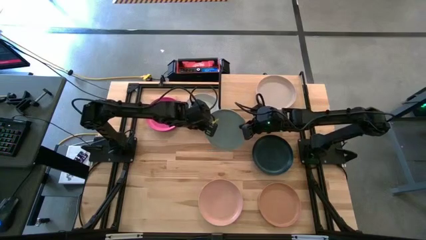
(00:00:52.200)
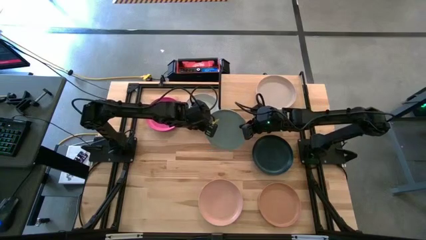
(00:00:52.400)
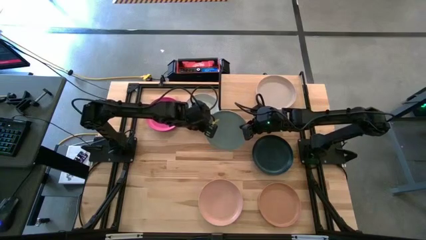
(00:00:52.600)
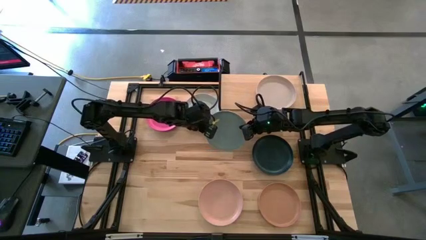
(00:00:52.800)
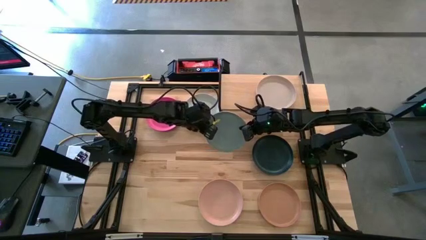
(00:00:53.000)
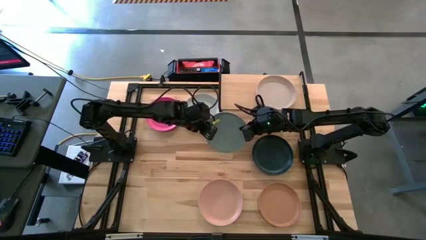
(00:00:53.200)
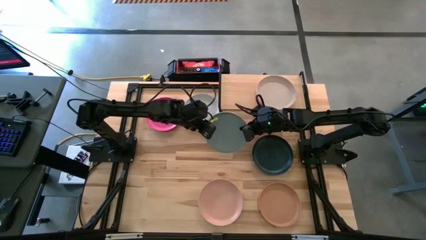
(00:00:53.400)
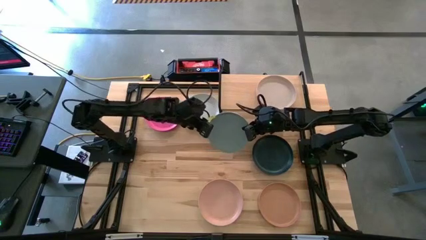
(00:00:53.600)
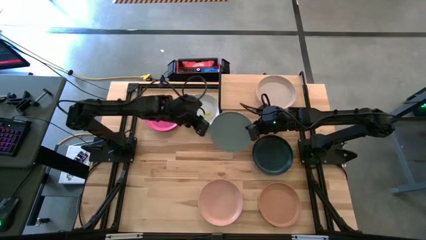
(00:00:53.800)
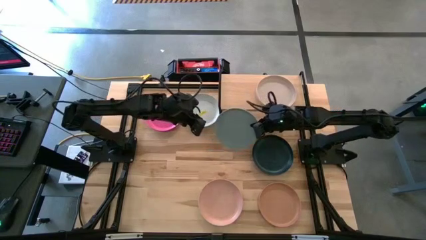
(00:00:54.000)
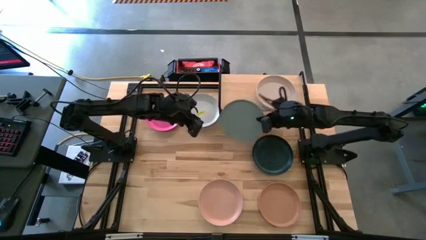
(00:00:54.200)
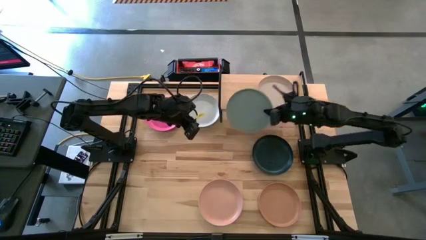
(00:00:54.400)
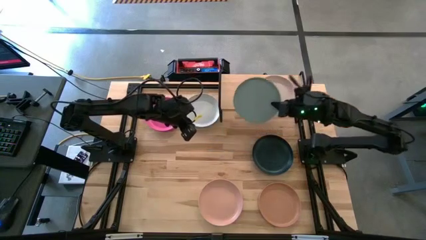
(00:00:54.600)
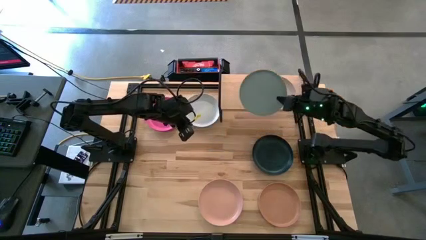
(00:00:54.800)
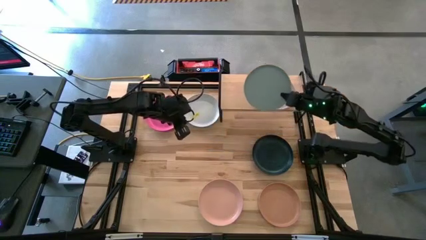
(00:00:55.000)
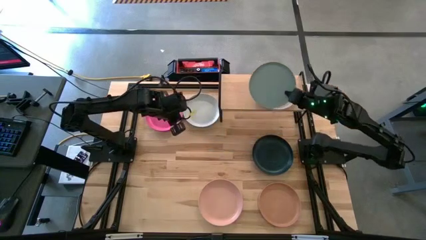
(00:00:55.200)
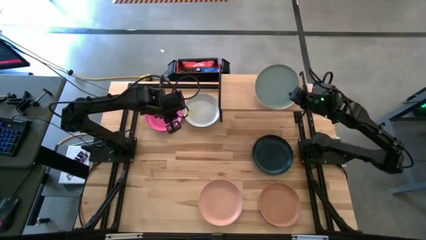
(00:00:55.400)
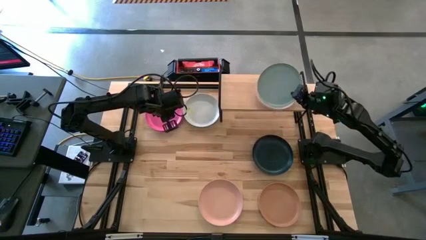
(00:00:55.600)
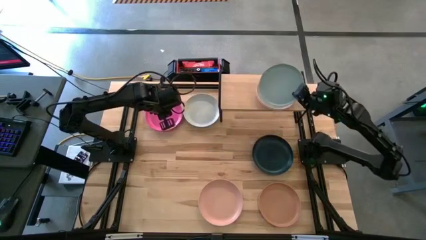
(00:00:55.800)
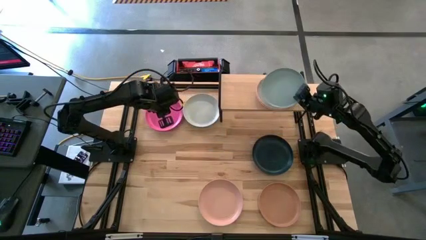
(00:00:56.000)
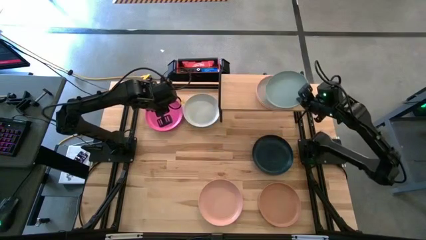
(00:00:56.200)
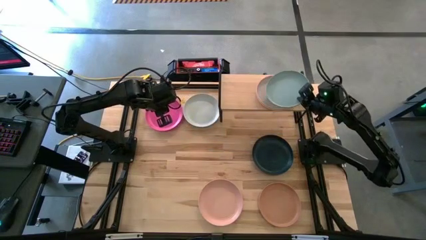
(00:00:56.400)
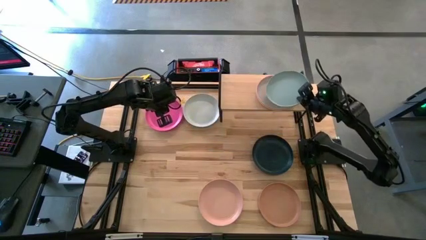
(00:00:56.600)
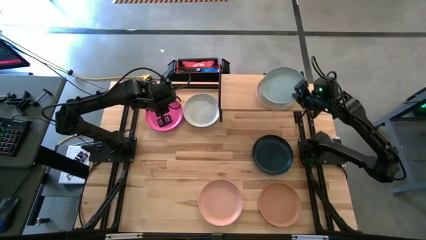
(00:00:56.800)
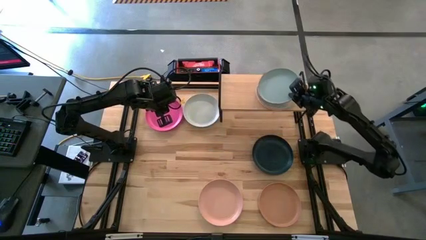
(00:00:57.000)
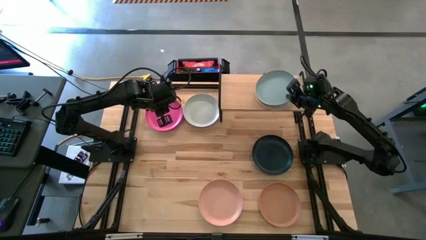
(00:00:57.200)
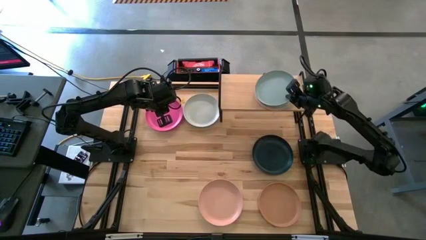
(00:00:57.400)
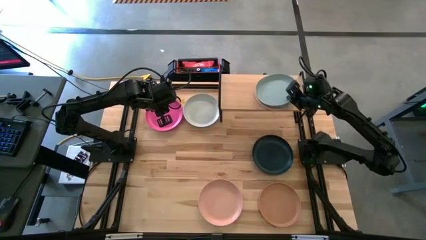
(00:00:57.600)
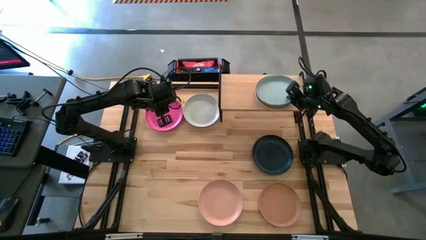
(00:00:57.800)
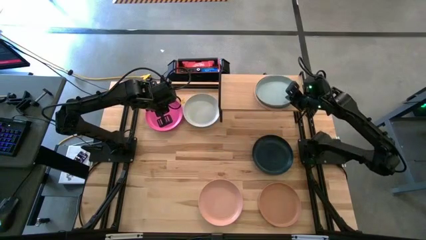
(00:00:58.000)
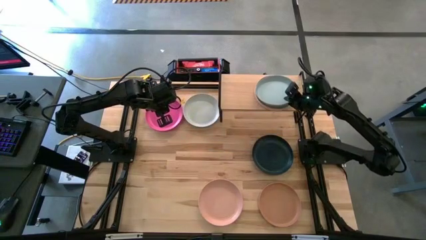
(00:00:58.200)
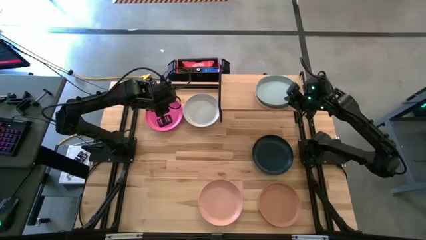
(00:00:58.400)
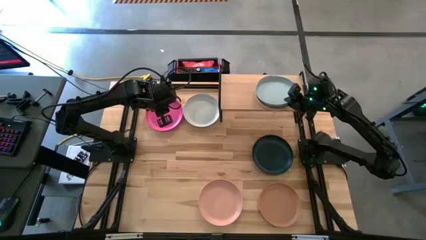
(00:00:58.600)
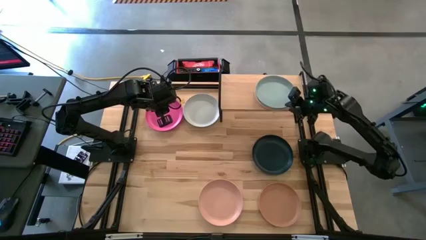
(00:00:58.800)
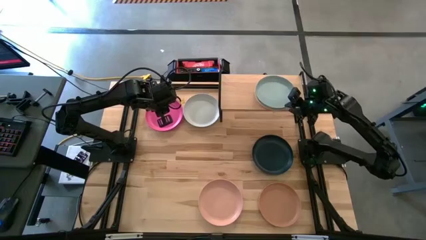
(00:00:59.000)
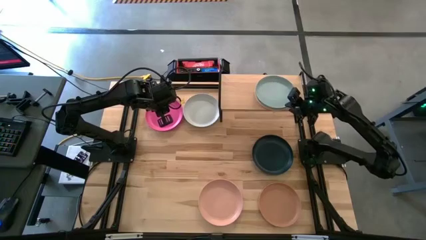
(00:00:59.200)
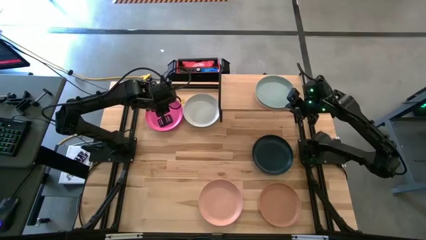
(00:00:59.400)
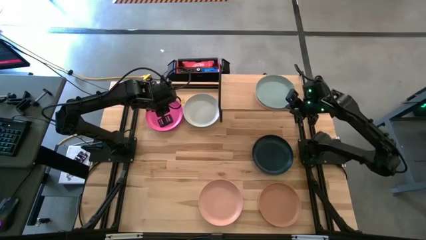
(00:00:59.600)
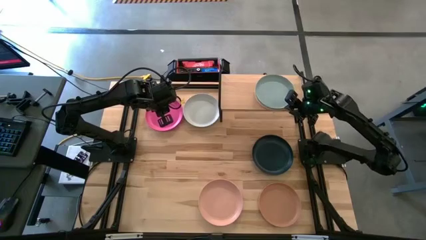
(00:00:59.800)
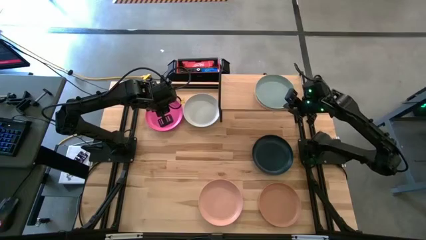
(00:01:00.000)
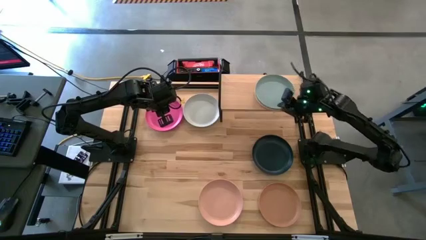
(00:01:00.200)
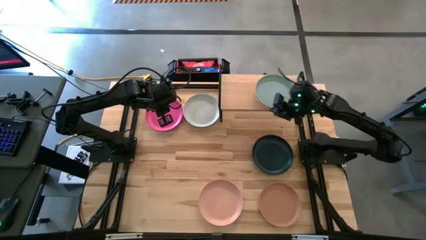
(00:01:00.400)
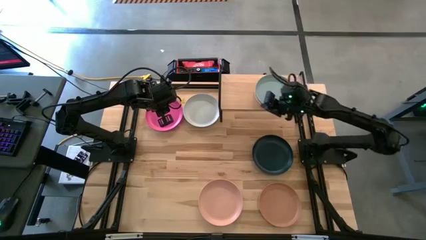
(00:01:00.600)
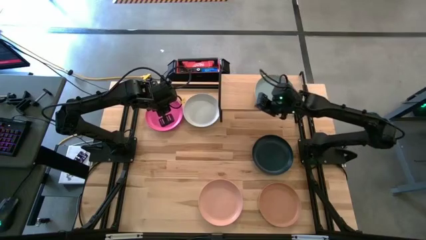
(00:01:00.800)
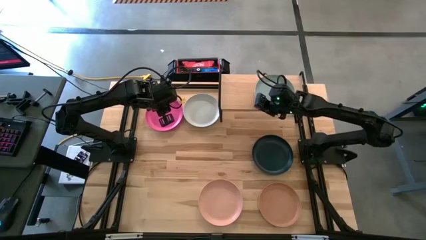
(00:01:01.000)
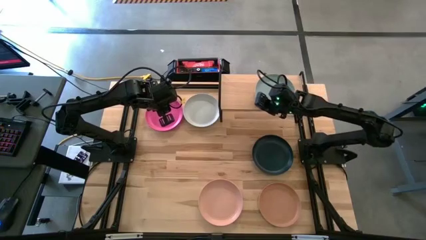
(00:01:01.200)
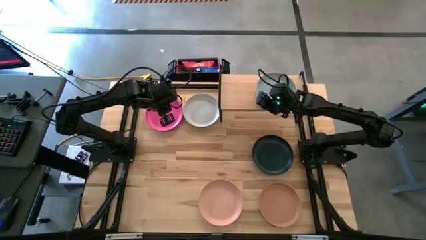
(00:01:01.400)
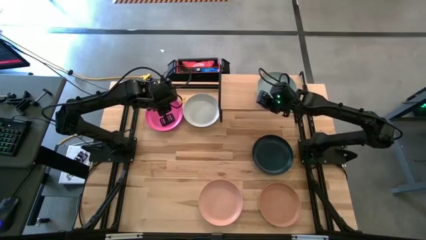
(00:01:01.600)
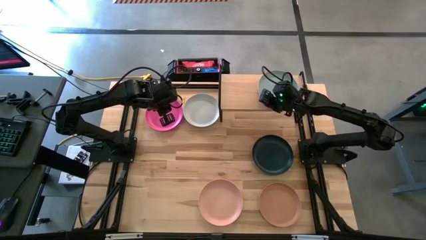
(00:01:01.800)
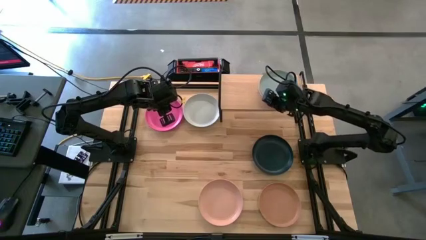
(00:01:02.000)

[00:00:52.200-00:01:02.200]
Task: Place and stack plates onto a shelf
Stack the gray plate on top of the white plate

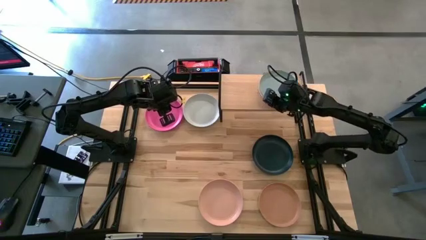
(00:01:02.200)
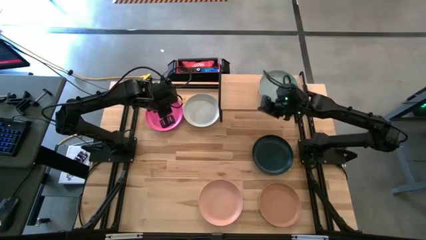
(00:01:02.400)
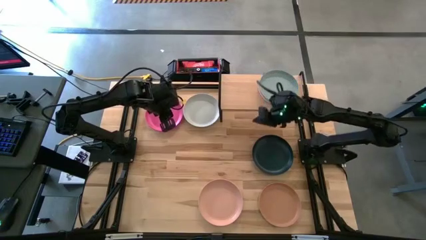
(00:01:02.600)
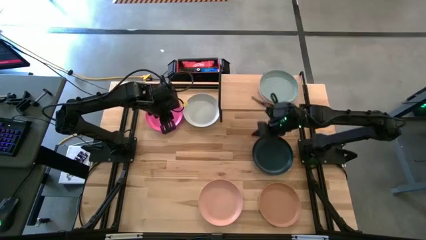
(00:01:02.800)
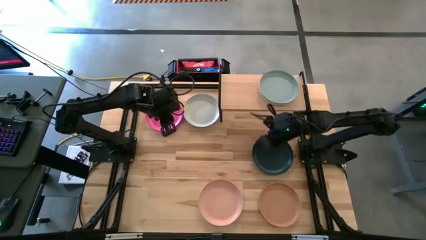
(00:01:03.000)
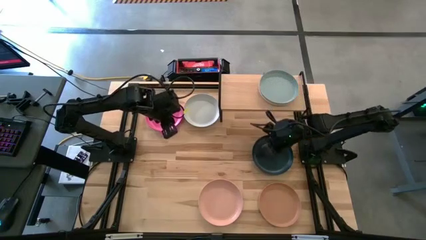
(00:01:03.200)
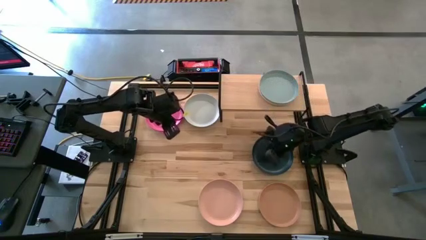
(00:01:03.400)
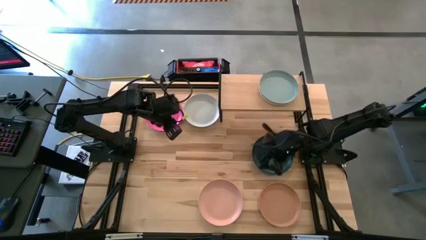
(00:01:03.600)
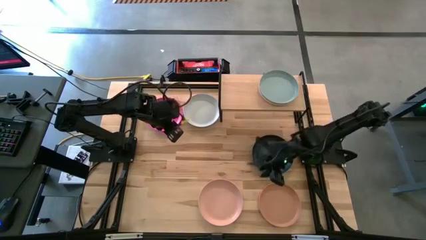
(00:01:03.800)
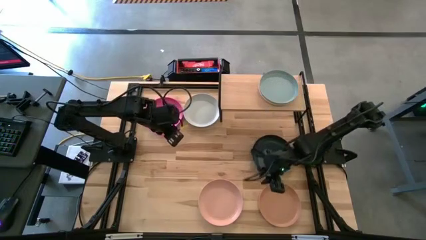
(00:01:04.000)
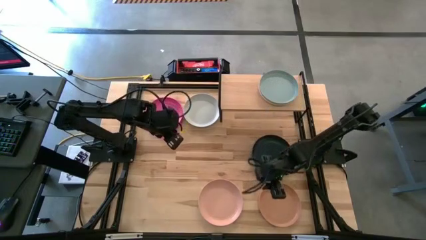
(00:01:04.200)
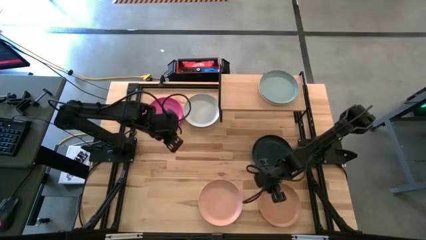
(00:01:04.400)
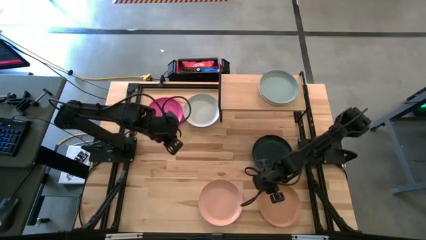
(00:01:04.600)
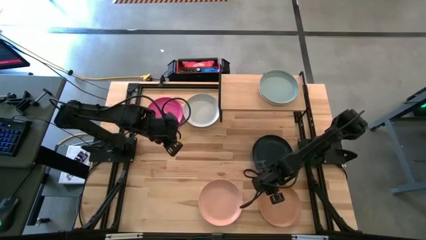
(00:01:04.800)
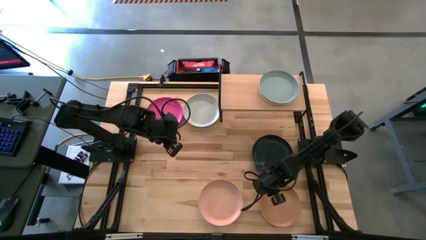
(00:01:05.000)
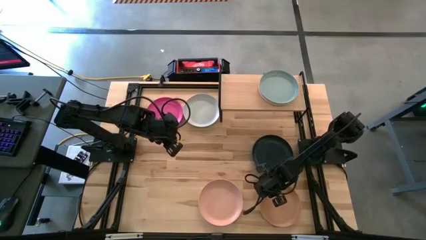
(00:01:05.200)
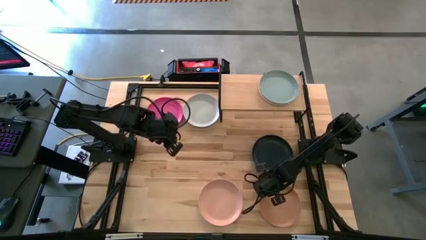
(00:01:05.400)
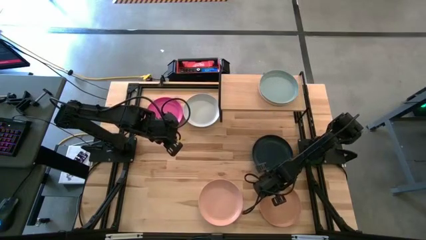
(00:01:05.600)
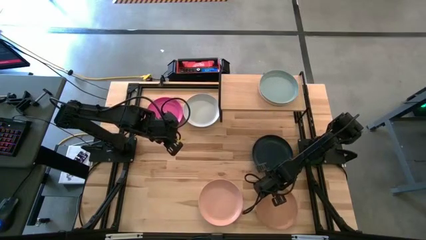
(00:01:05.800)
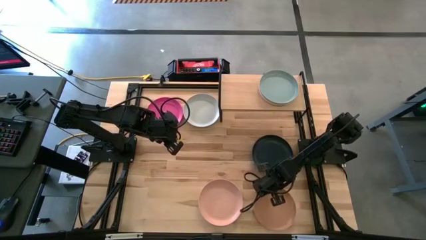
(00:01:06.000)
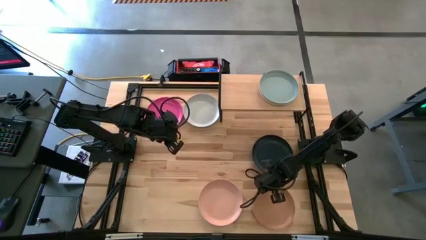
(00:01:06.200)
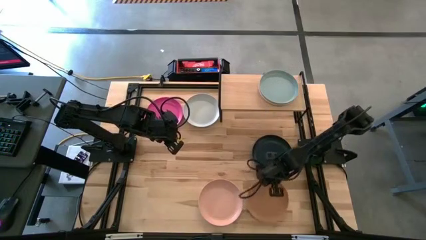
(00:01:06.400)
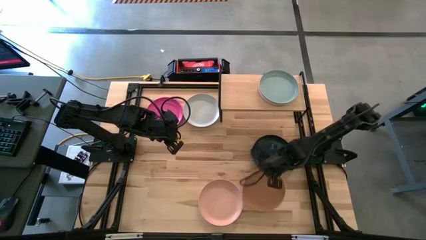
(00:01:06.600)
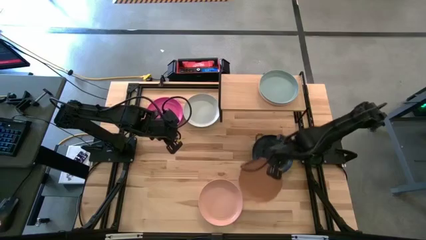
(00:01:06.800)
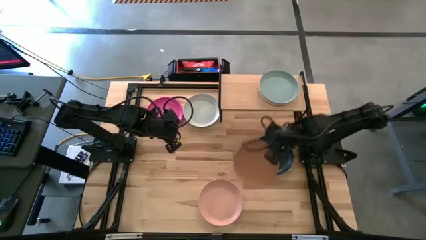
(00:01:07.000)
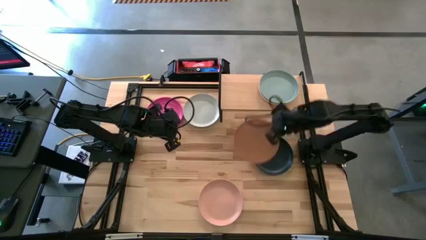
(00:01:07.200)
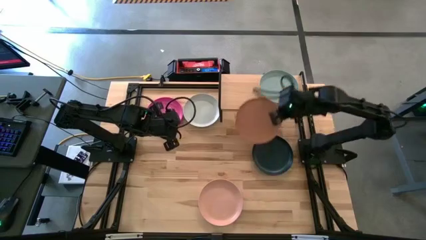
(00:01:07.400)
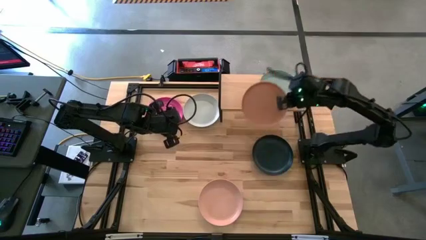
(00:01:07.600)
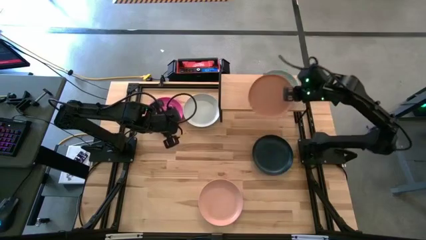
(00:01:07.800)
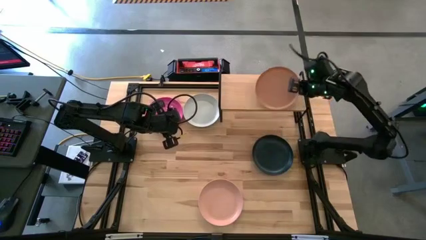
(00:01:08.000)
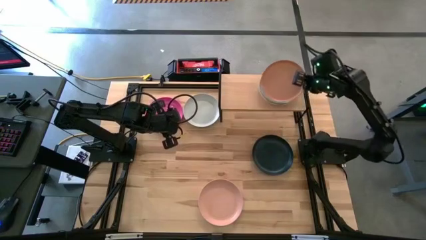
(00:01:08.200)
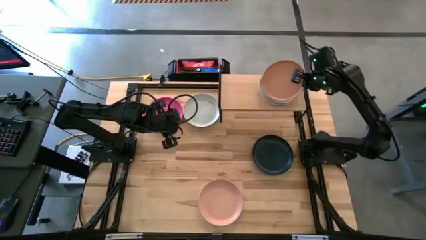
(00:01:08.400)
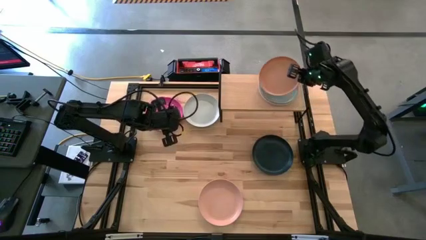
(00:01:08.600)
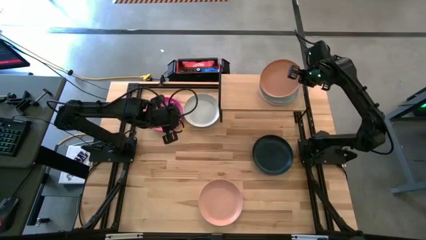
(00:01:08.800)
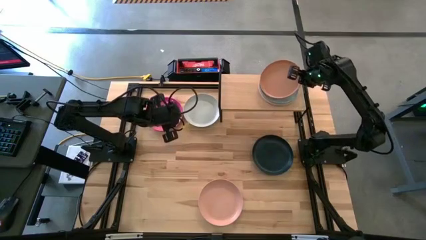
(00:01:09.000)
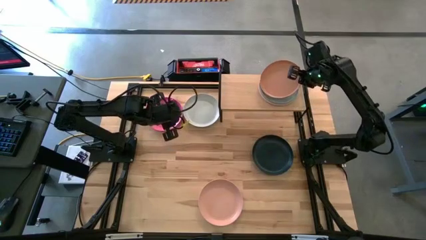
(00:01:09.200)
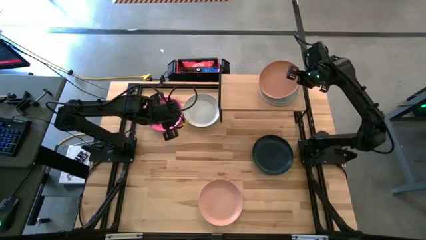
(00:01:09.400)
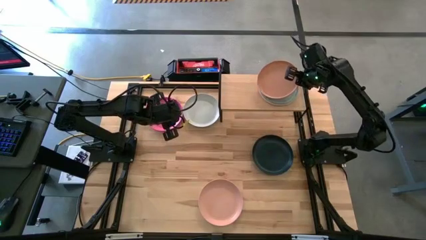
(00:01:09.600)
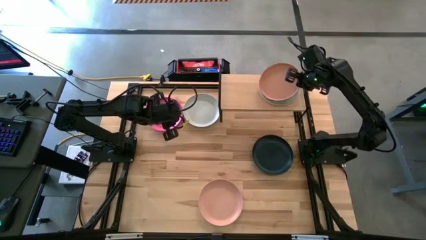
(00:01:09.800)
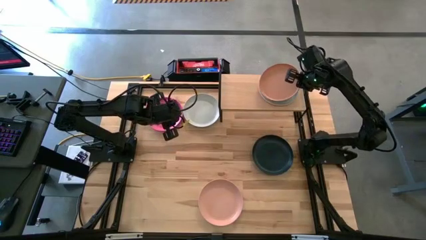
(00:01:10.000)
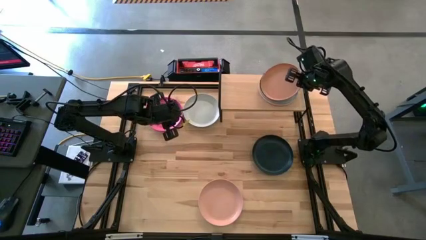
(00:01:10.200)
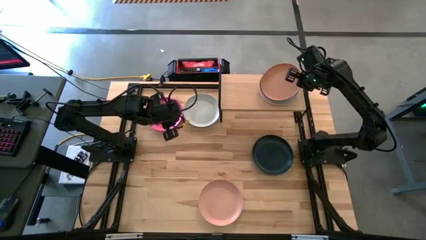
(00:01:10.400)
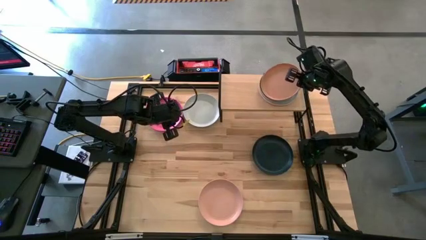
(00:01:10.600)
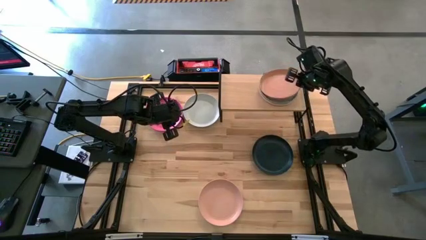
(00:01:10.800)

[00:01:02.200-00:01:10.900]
Stack the brown plate on top of the gray plate
